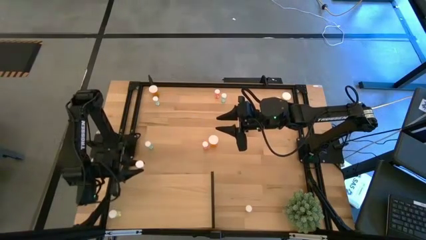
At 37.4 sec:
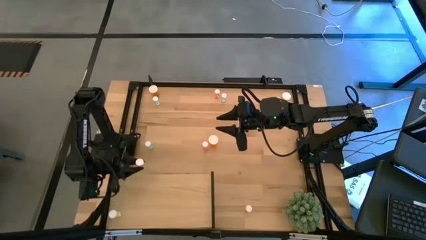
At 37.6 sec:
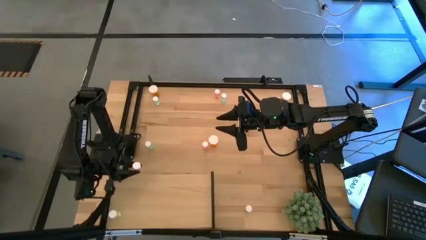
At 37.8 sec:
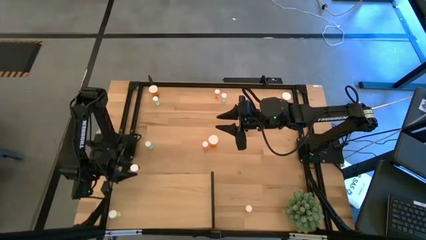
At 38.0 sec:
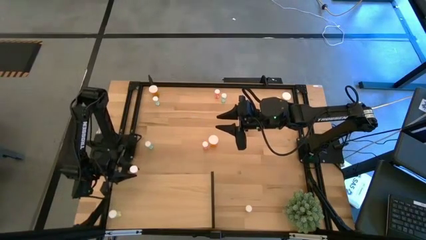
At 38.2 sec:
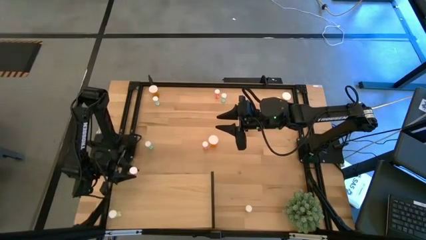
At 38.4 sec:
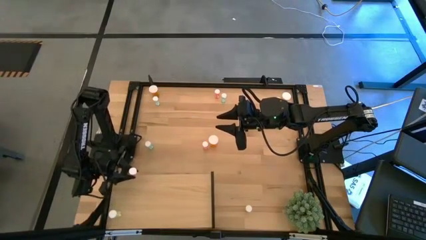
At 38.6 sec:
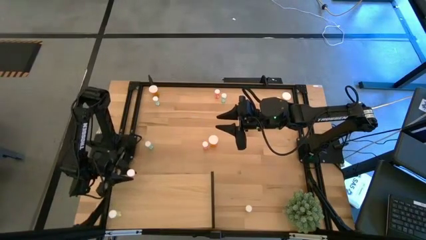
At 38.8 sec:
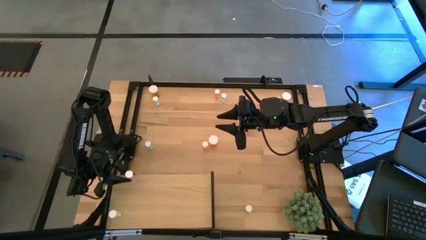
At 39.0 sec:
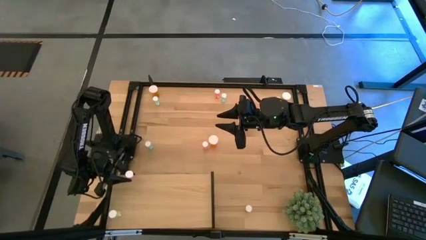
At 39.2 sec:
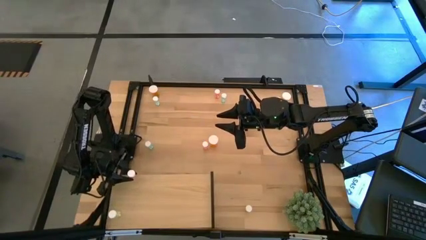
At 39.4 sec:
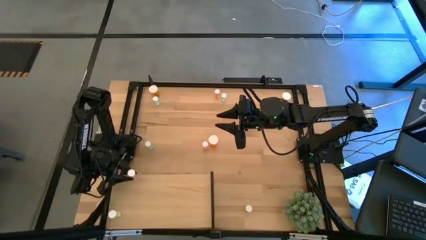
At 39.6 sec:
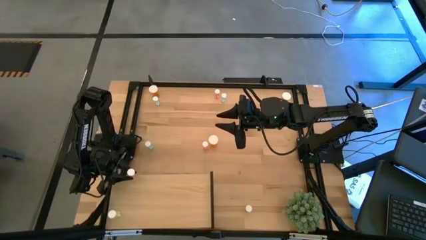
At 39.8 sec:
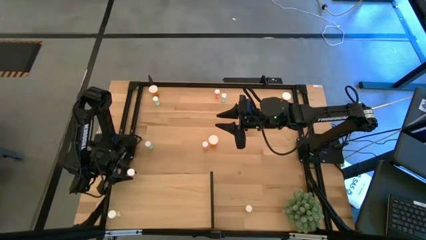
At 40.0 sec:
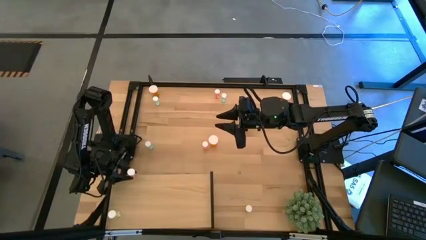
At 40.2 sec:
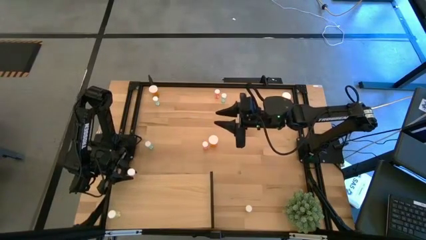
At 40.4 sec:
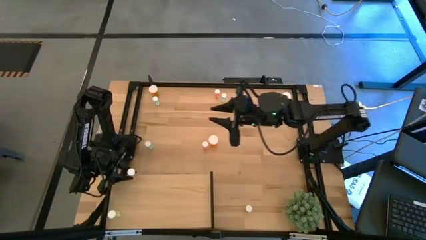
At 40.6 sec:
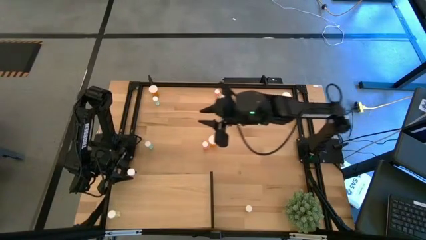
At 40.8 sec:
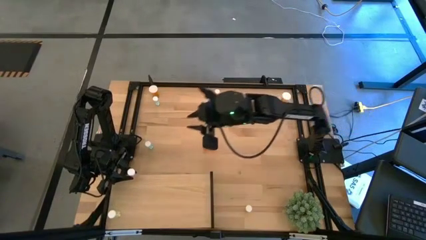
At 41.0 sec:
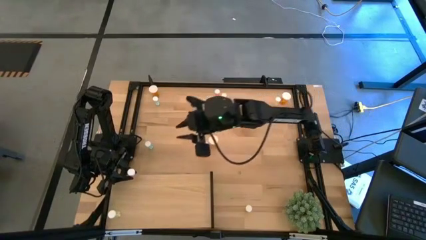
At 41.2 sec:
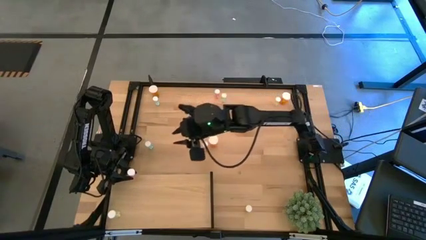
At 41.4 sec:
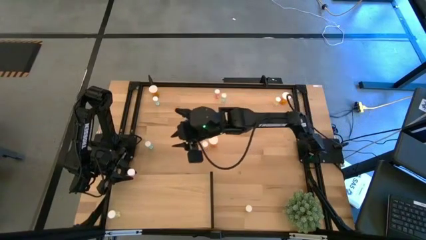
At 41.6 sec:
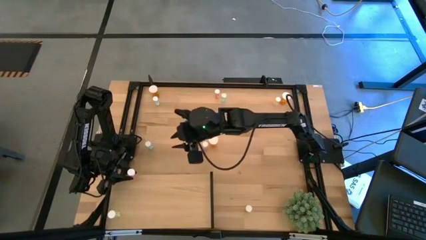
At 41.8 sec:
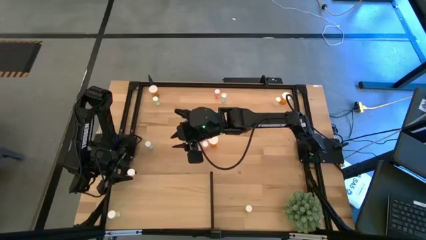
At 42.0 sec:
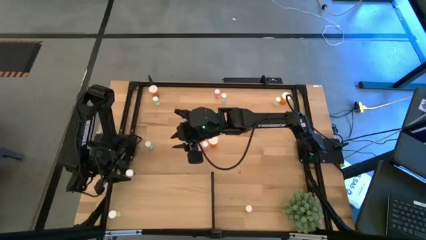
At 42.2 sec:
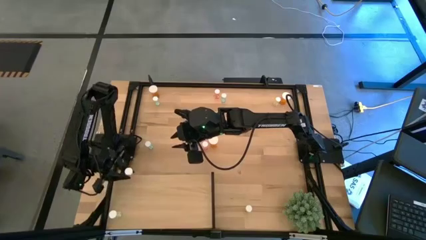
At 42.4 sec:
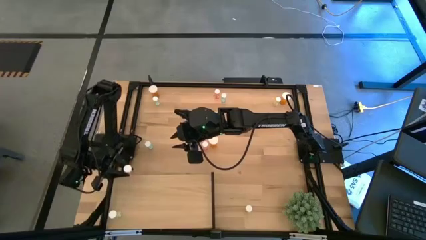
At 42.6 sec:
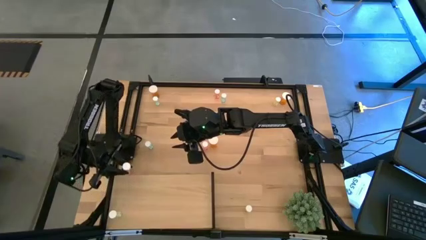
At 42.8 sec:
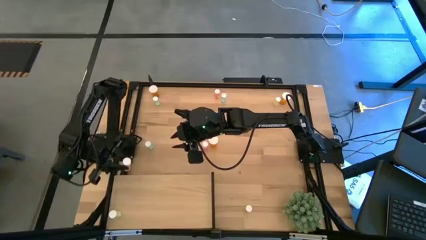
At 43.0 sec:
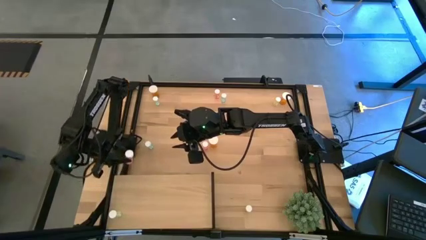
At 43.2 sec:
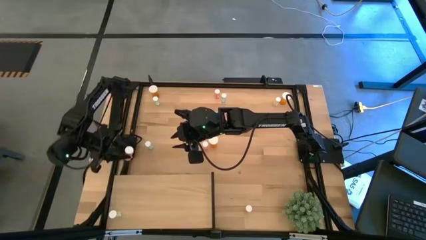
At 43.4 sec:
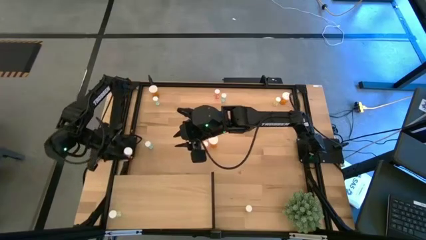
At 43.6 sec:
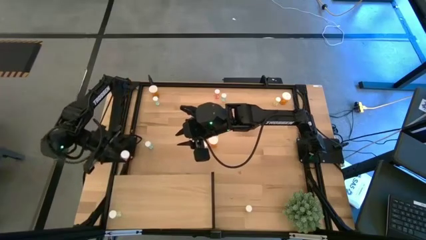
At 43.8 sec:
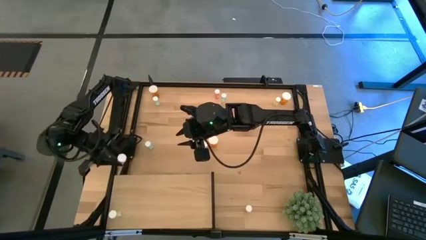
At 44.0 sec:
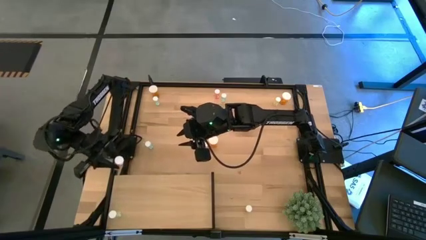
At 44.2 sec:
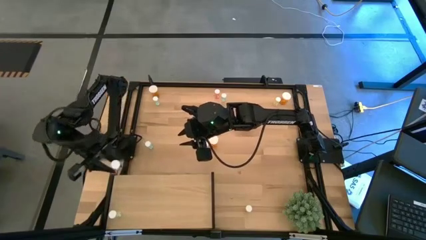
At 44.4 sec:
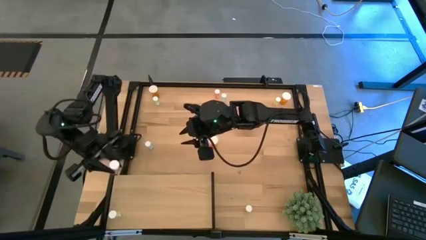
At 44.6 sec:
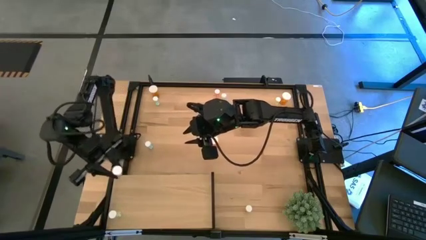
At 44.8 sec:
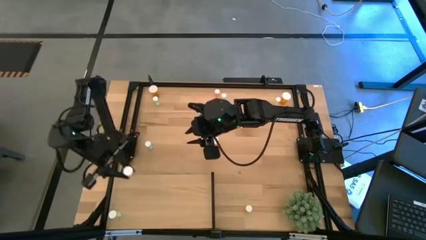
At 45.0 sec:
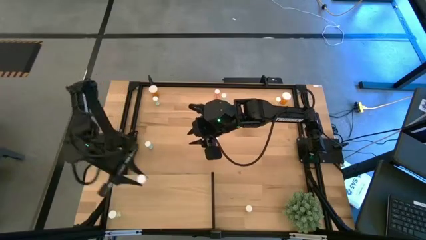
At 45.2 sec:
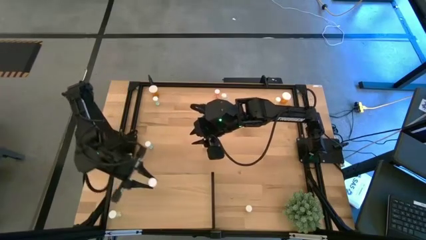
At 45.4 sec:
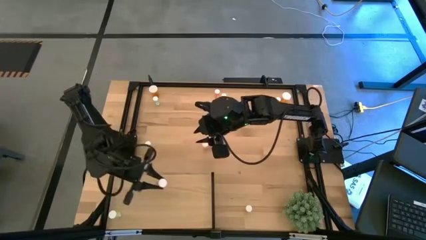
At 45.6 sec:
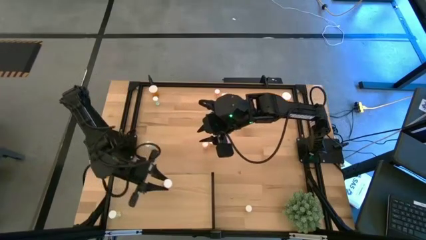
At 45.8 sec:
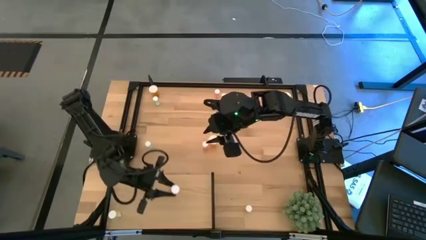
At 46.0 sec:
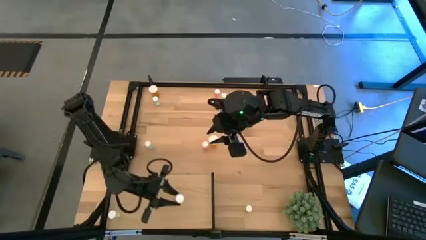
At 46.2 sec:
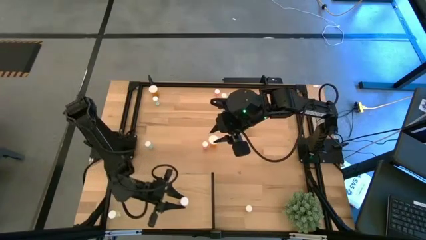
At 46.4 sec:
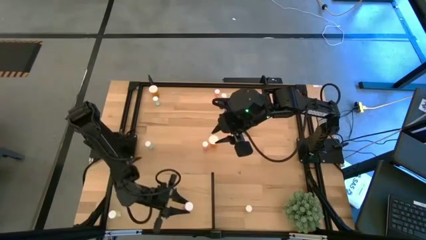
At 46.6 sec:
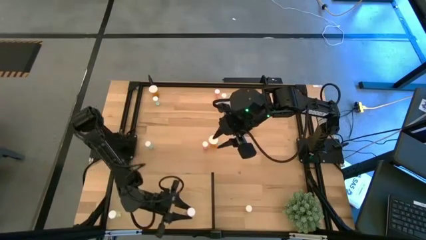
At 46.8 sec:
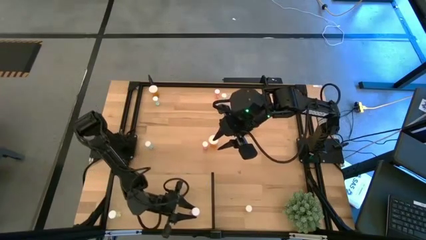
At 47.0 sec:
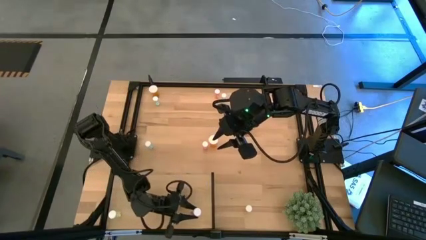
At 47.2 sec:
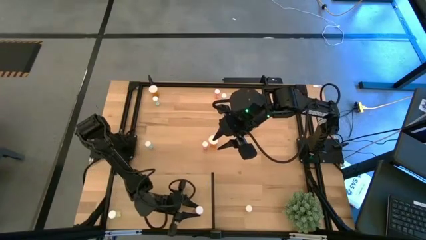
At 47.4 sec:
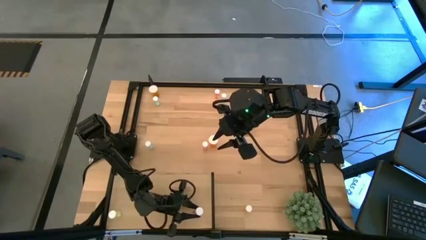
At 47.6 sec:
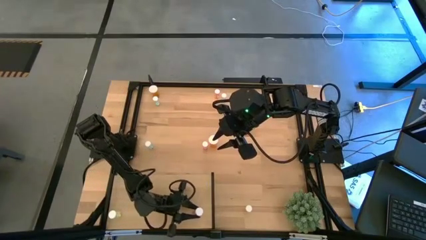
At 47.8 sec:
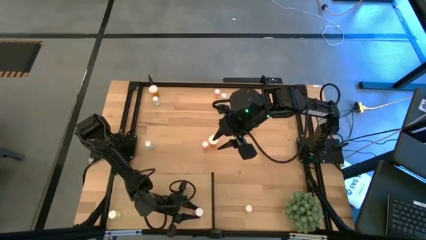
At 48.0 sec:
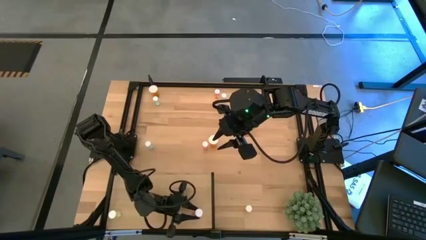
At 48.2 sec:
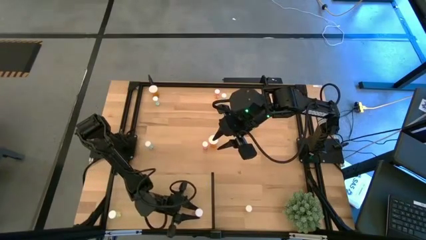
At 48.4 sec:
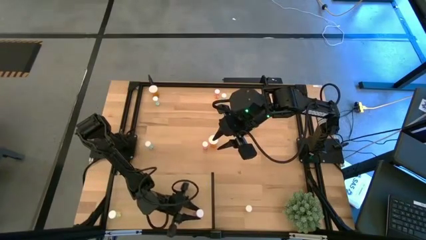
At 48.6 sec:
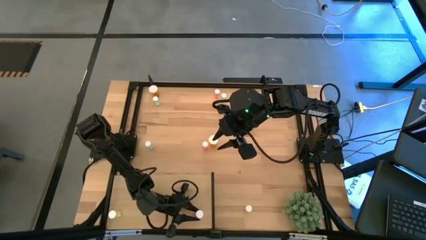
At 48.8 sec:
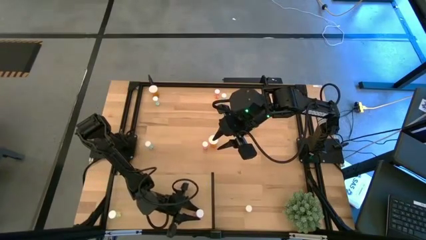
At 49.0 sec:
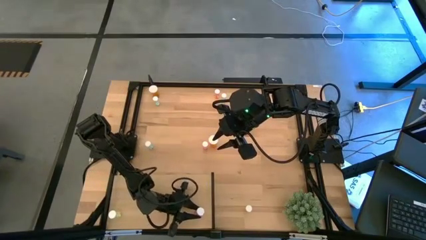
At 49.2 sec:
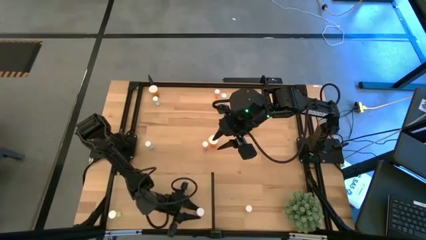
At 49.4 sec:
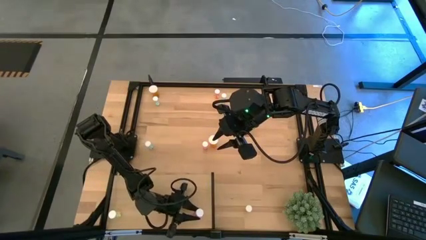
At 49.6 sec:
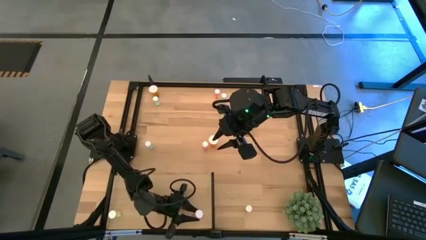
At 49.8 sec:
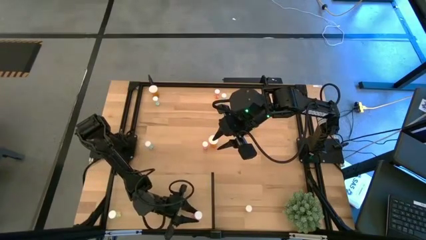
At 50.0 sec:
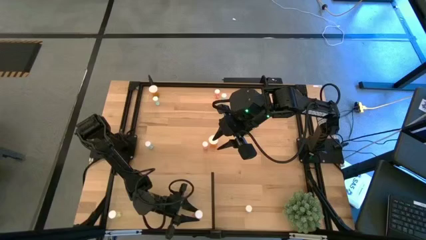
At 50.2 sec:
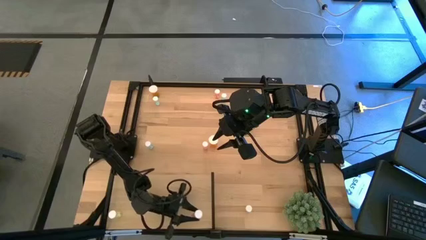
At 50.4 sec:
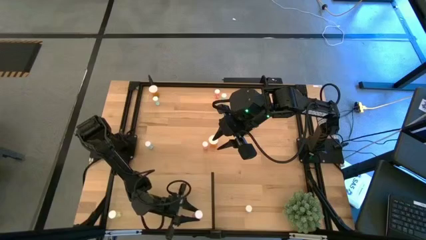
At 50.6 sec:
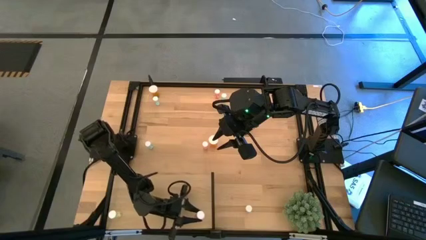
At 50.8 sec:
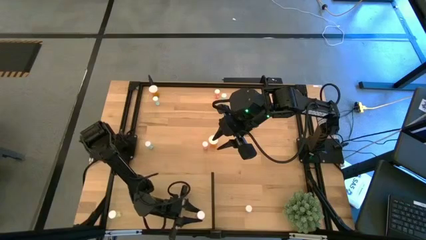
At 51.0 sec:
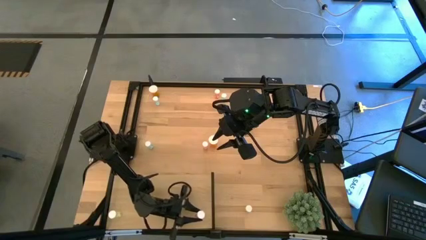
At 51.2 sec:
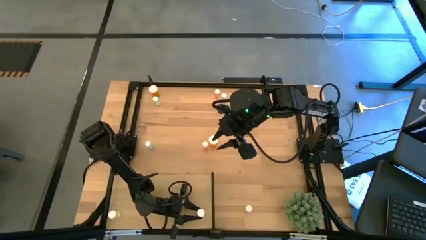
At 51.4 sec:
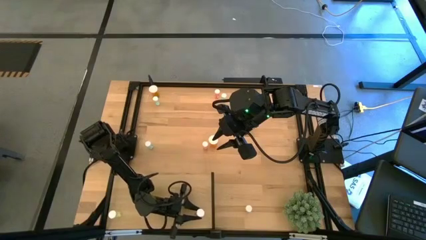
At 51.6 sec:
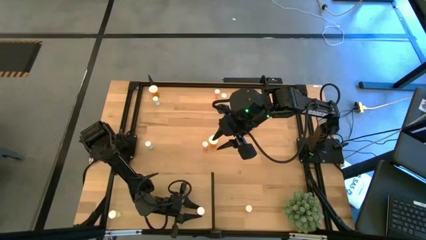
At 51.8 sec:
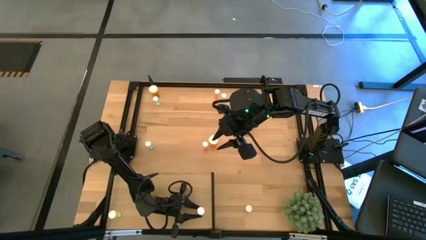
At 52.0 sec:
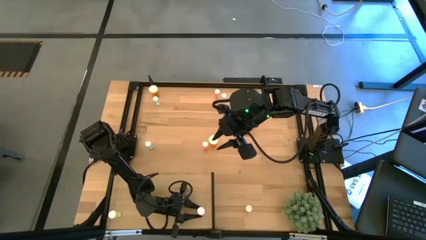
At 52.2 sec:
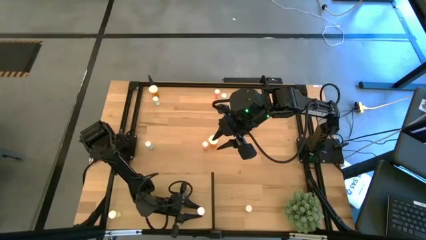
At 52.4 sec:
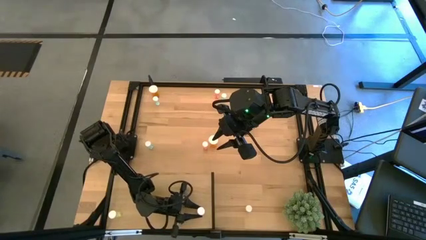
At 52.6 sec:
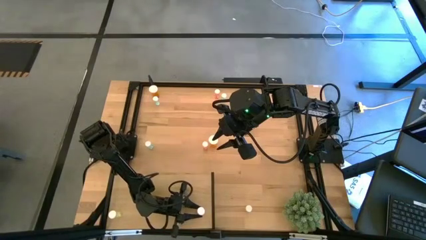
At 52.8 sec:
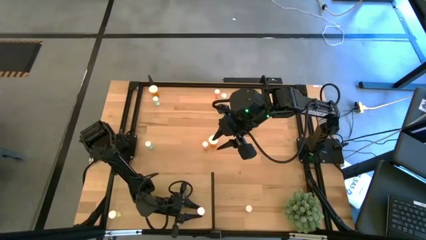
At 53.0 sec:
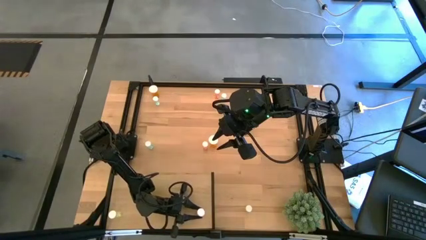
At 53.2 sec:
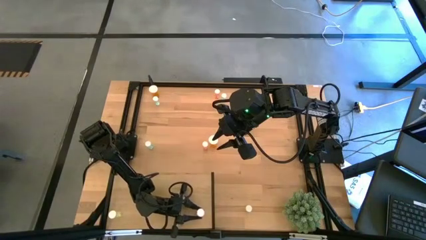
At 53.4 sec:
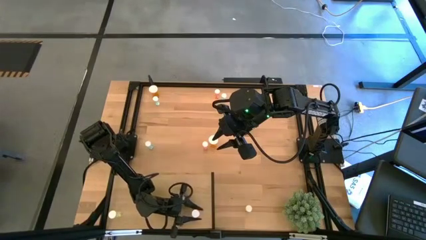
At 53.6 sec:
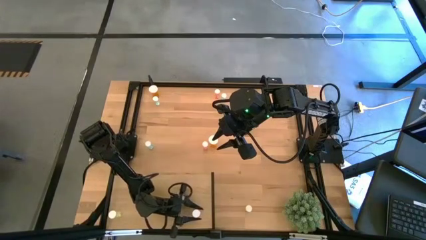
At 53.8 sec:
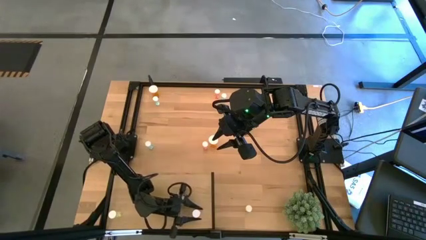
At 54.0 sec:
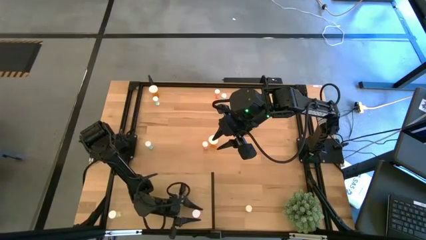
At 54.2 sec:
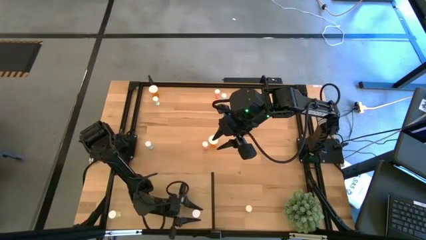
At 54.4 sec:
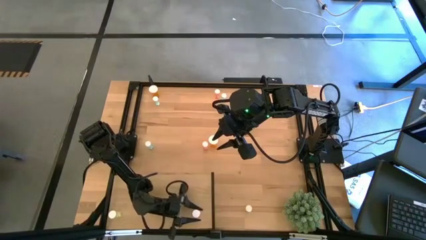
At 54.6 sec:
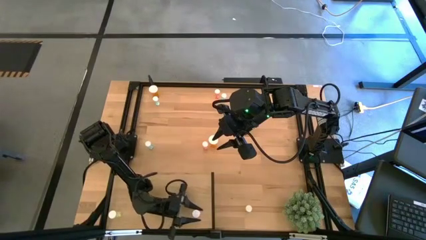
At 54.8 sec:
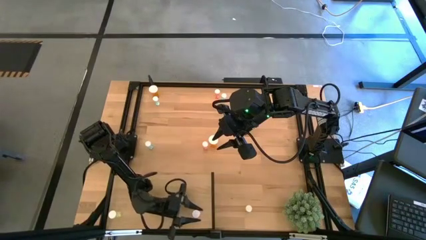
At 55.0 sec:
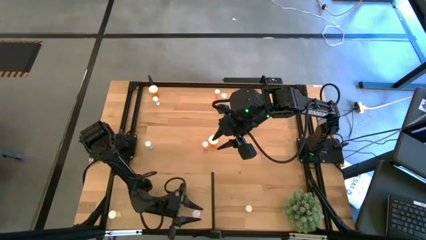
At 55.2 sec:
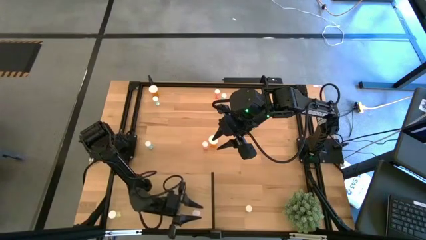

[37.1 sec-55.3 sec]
Task: Pick and place medicine bottles onto shelf by color
Put the right pink pill bottle on the shelf
